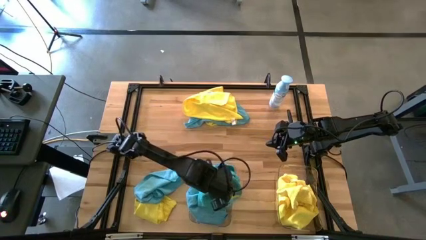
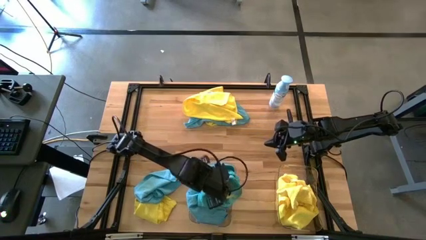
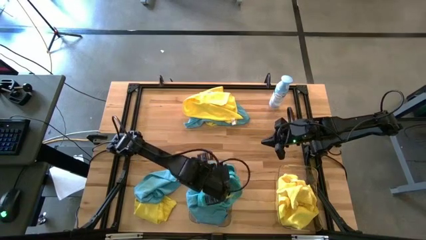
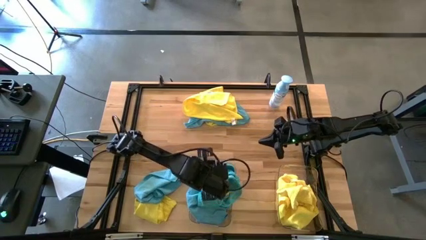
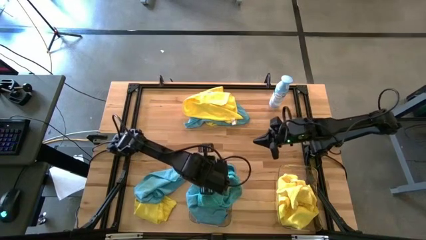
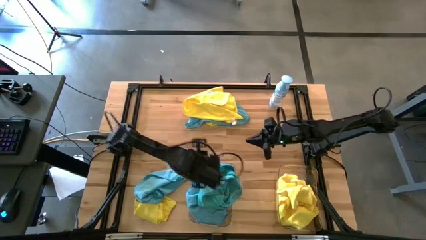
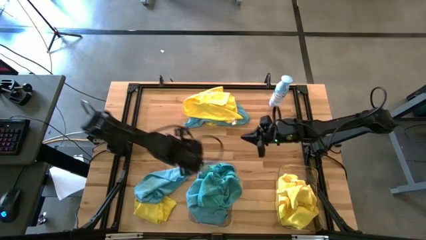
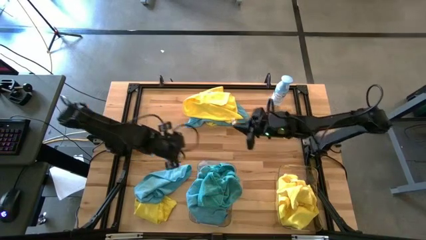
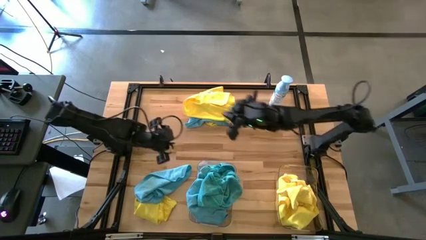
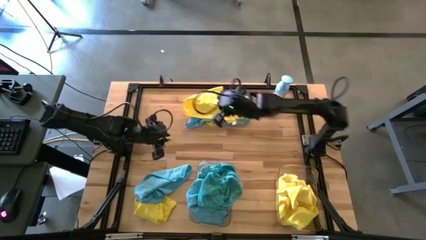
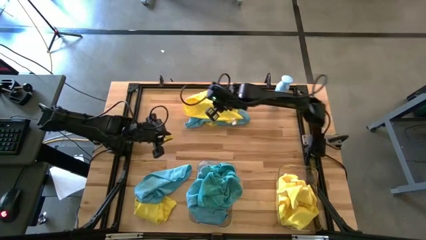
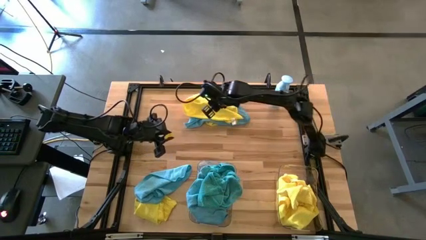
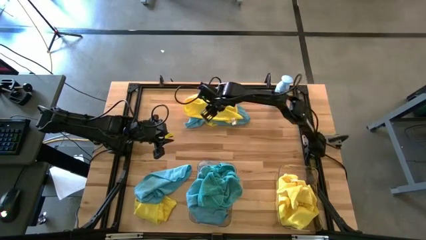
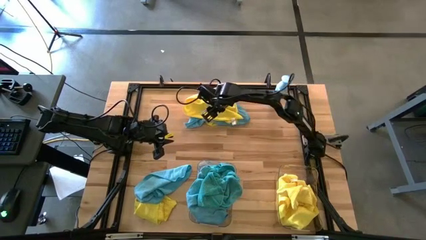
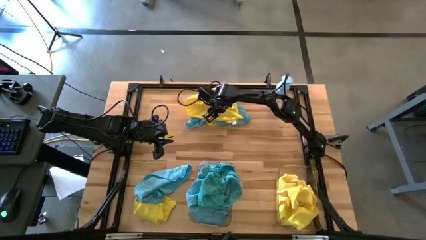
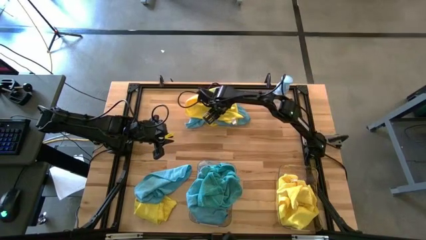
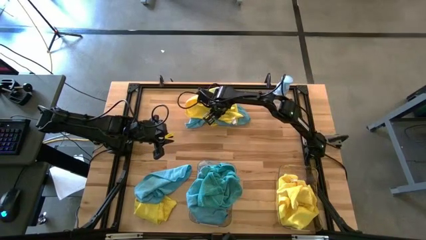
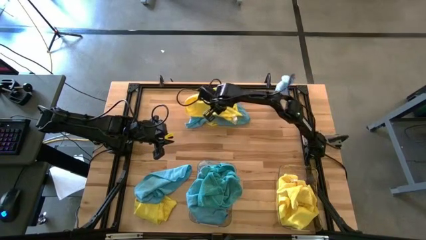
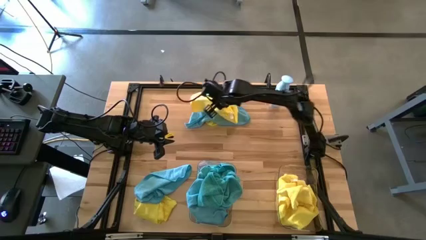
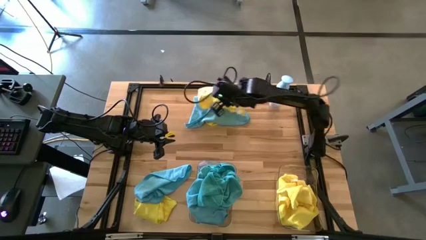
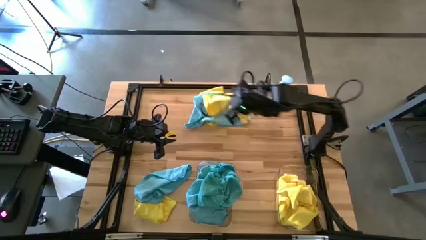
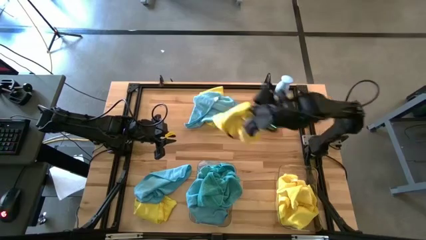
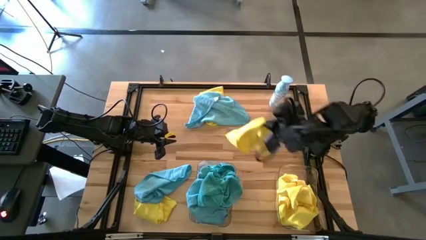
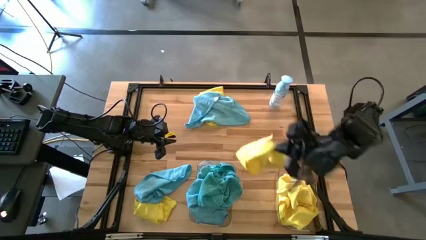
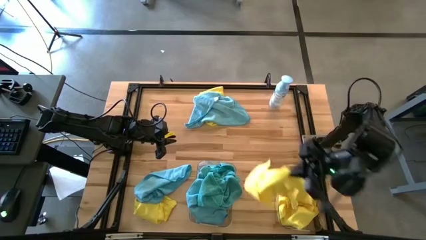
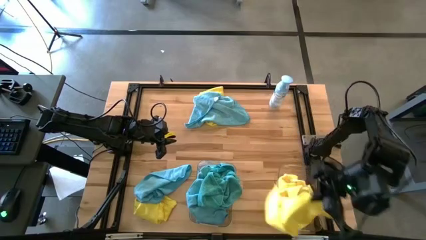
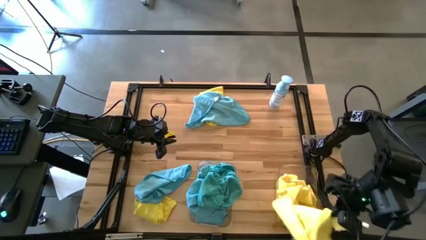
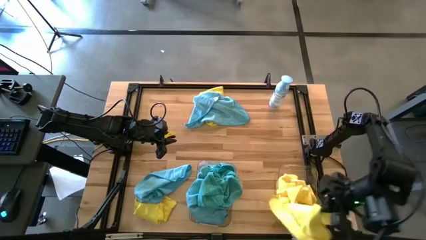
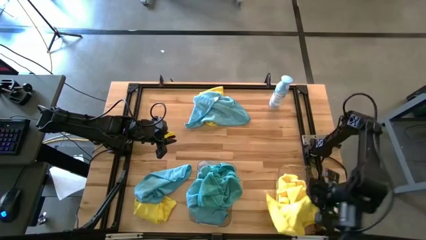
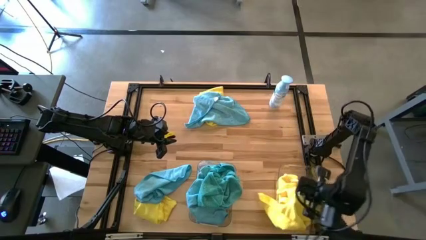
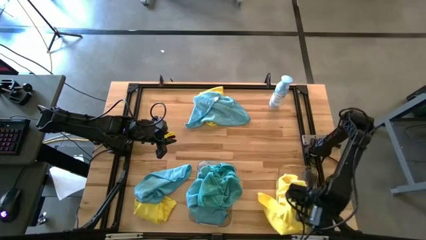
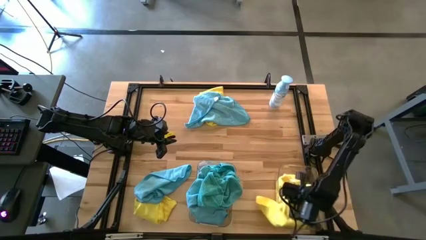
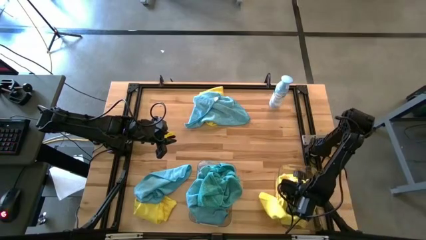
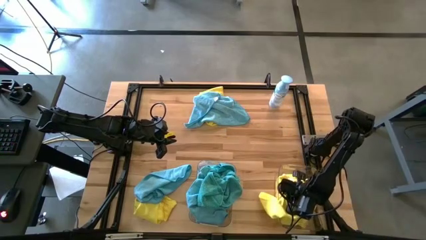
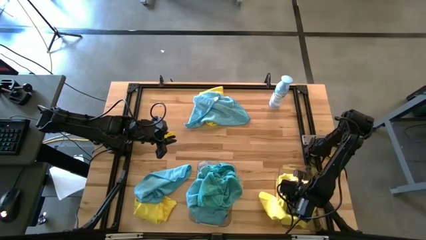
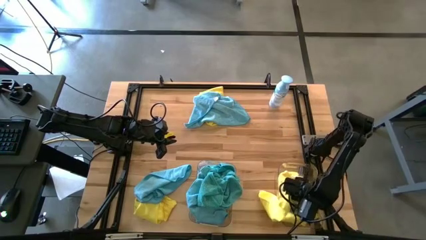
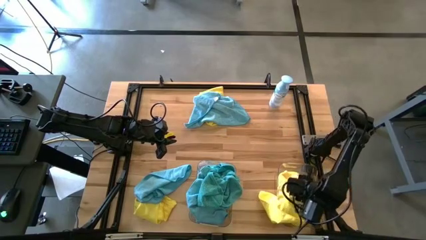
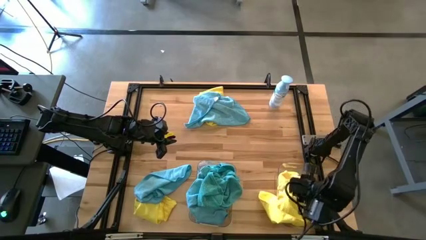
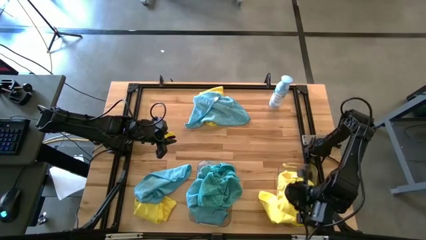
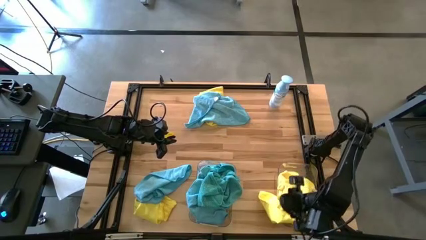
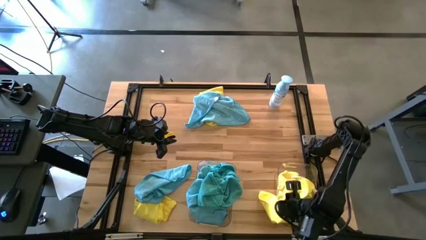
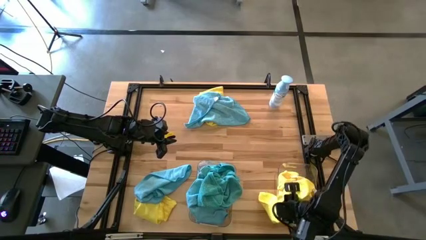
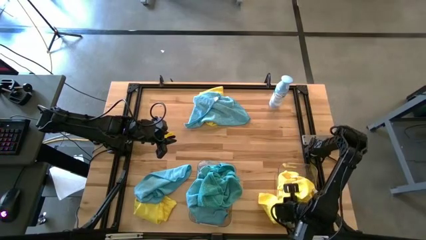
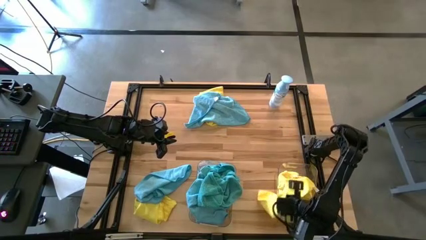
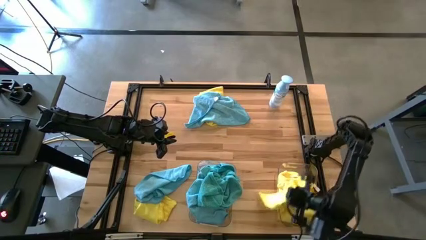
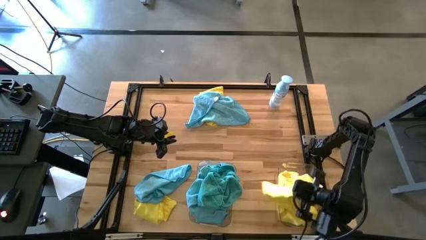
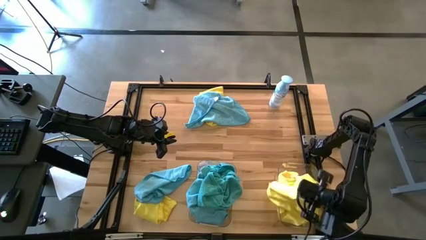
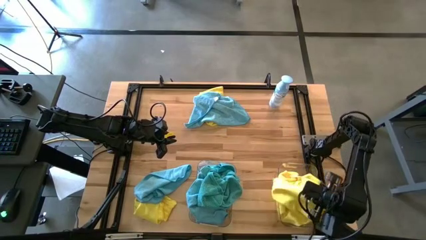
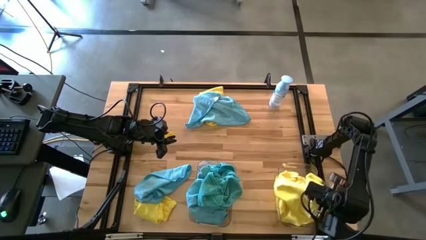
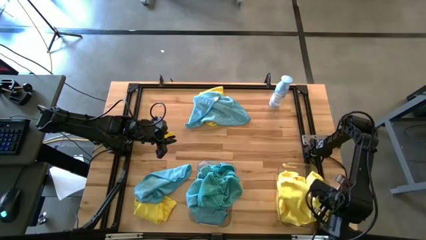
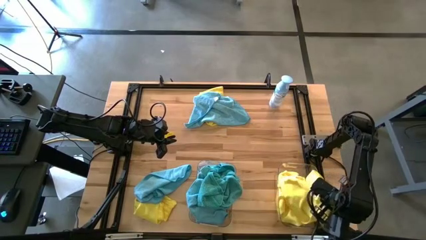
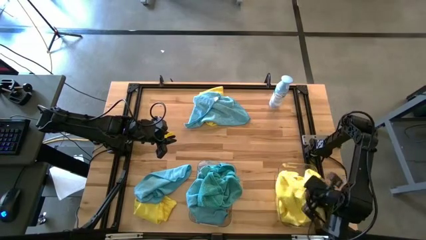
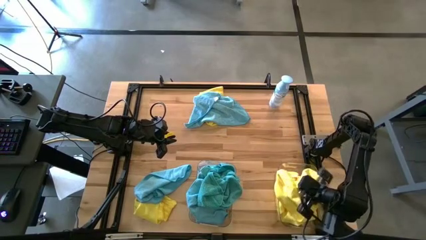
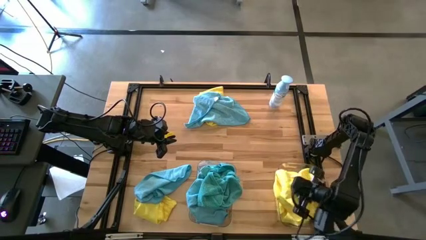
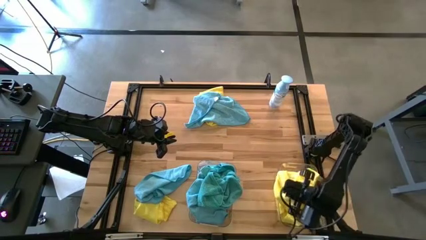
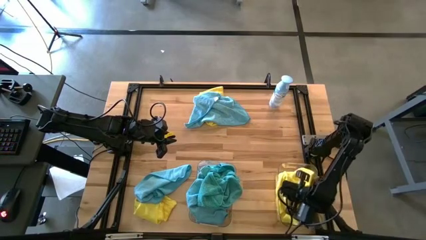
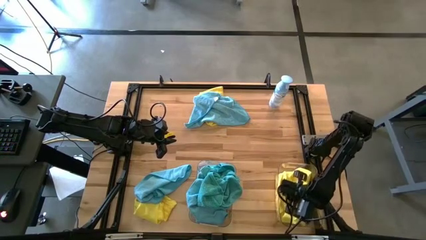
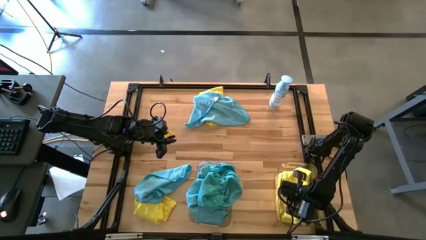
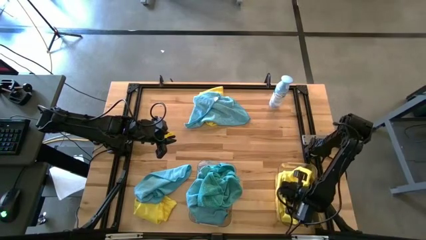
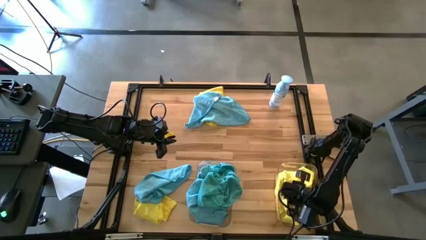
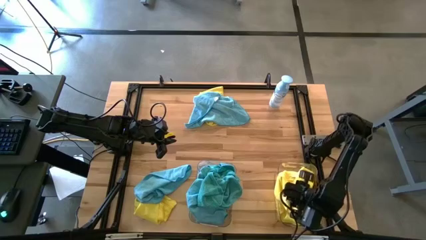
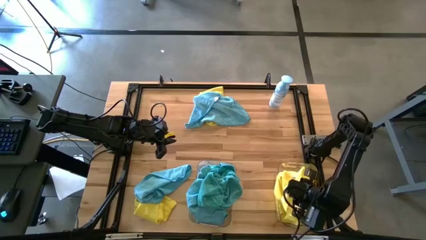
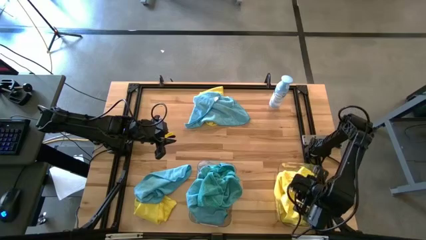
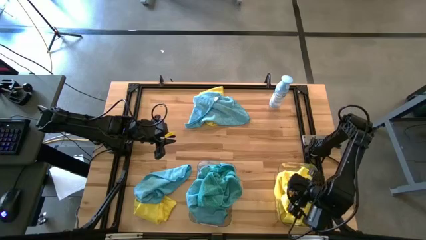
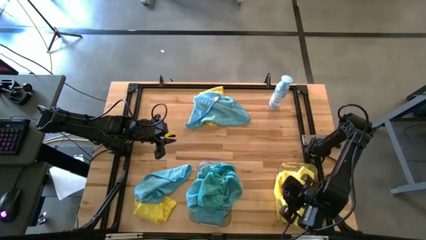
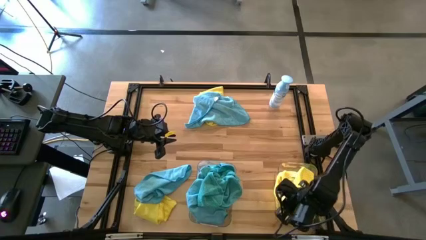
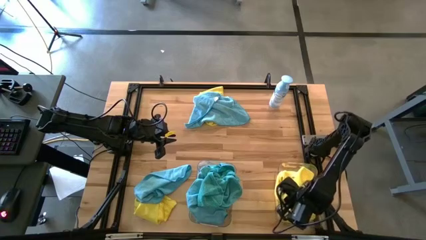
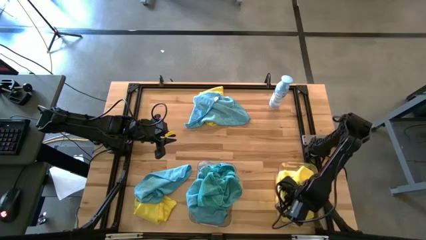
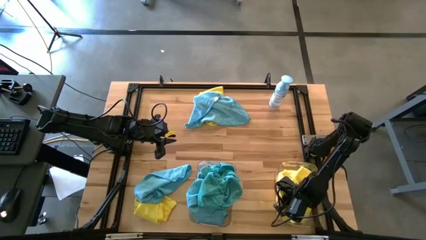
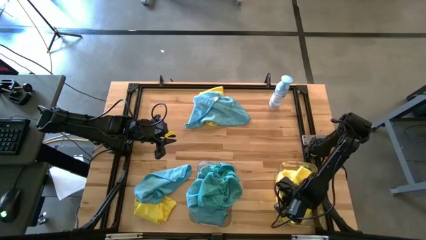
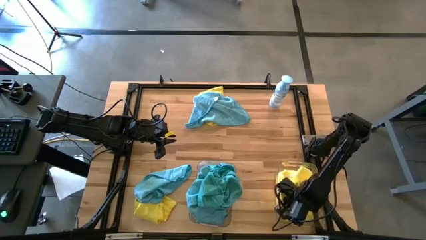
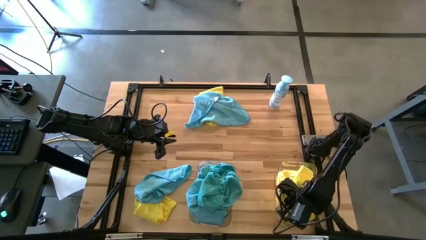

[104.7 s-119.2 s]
Task: Sort microfiber towel by color & place in baskets
Put the yellow towel into the right transparent bin
